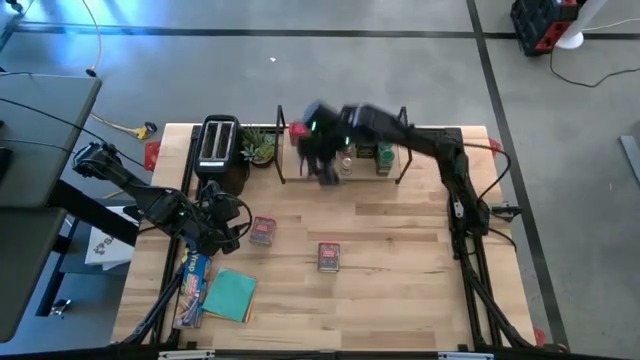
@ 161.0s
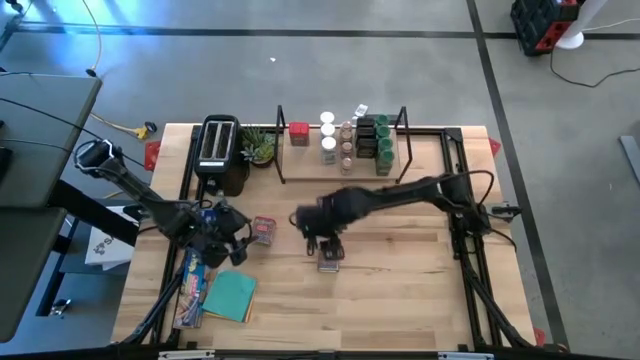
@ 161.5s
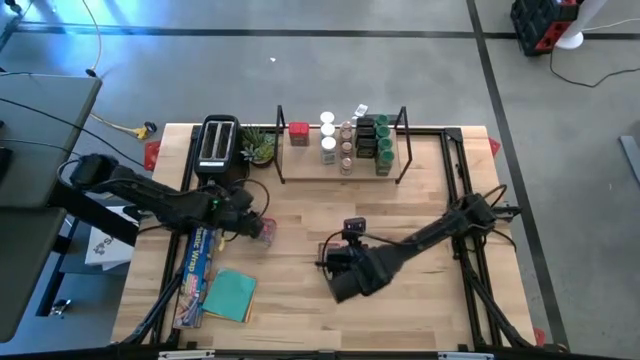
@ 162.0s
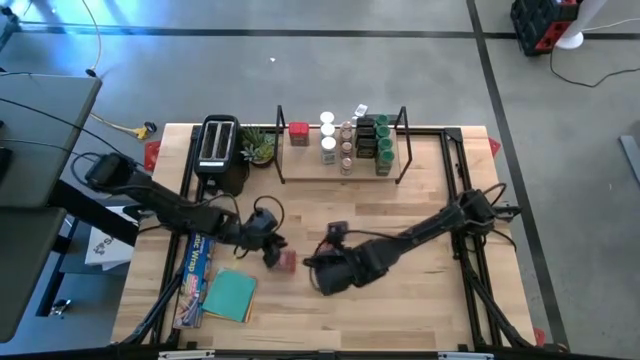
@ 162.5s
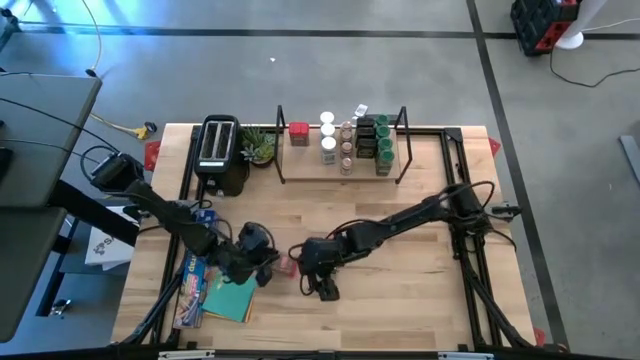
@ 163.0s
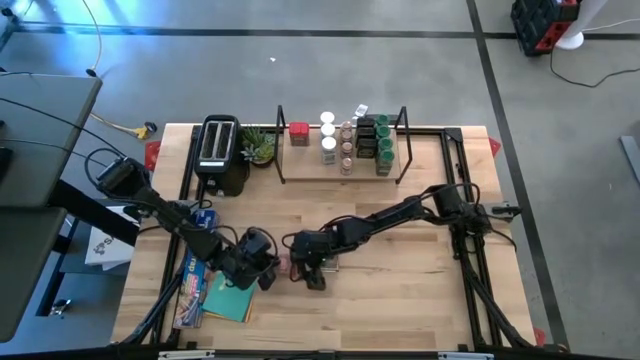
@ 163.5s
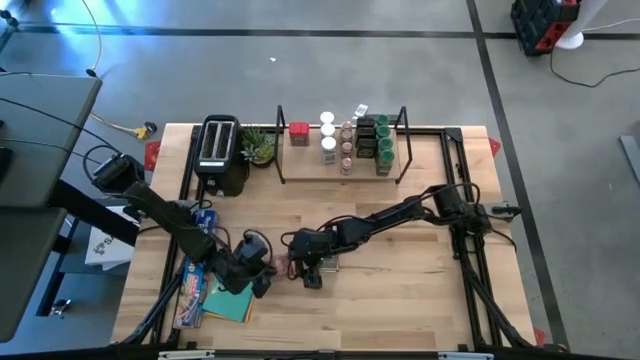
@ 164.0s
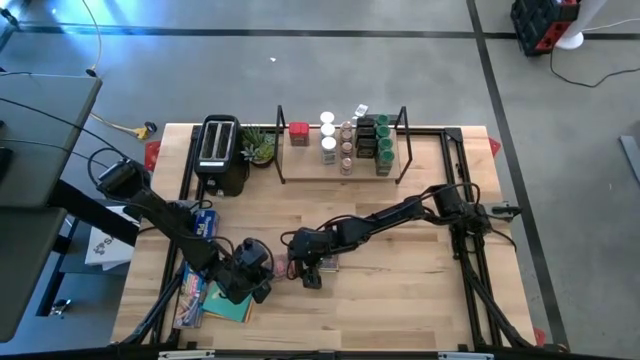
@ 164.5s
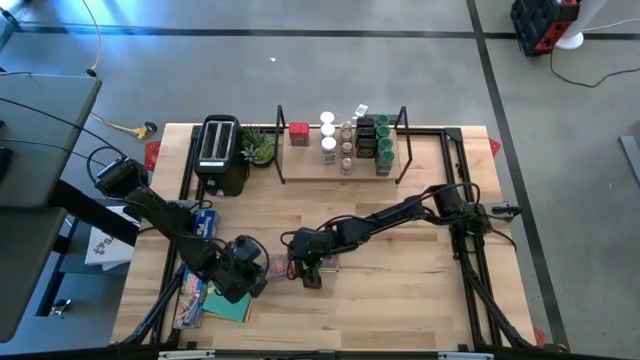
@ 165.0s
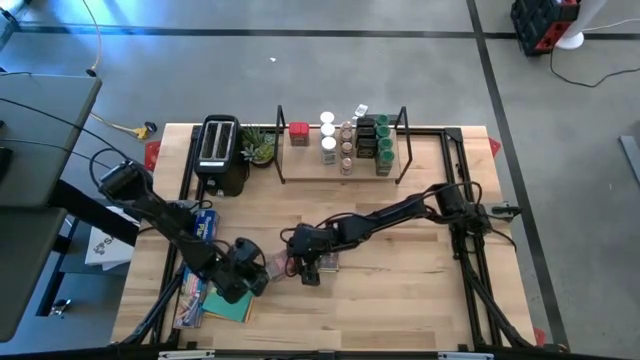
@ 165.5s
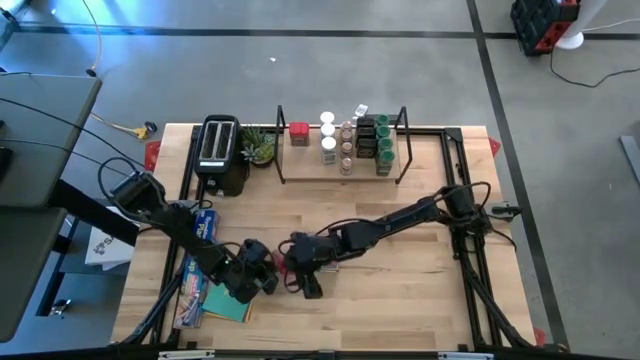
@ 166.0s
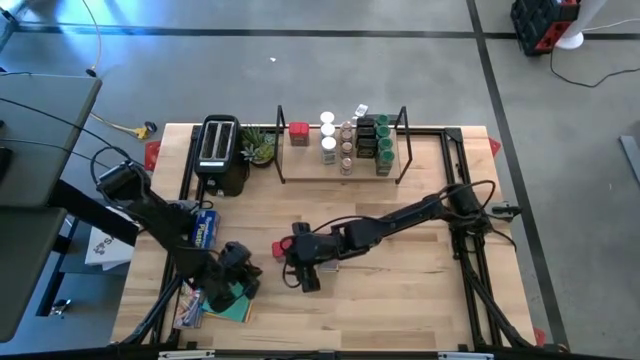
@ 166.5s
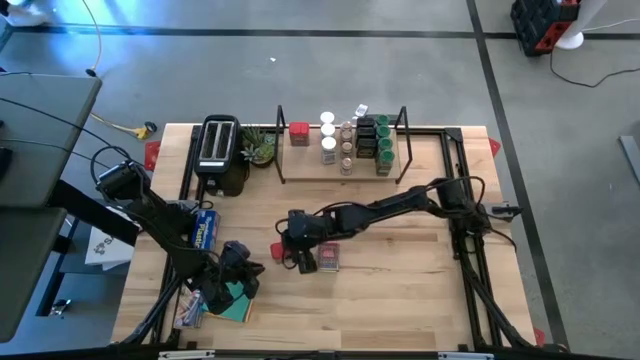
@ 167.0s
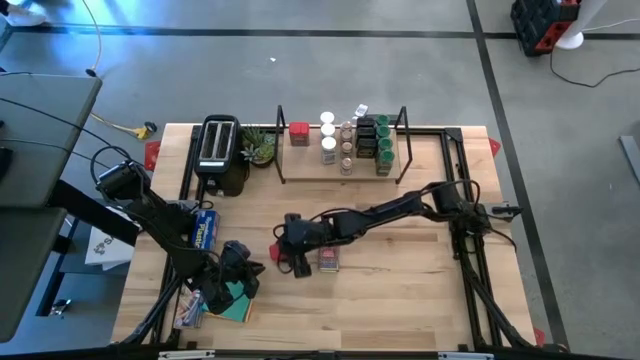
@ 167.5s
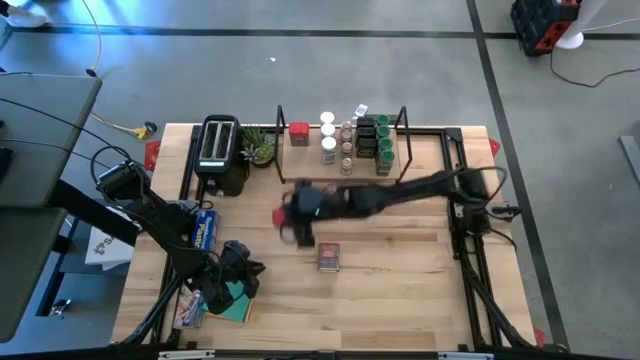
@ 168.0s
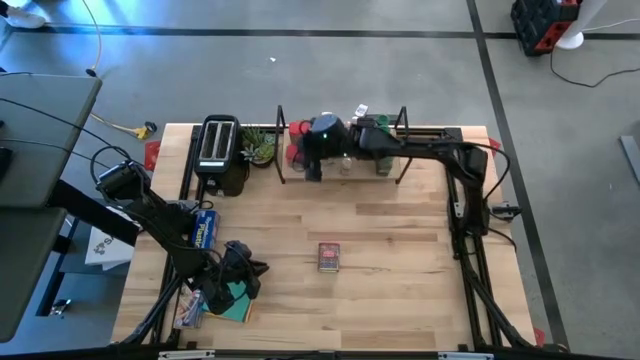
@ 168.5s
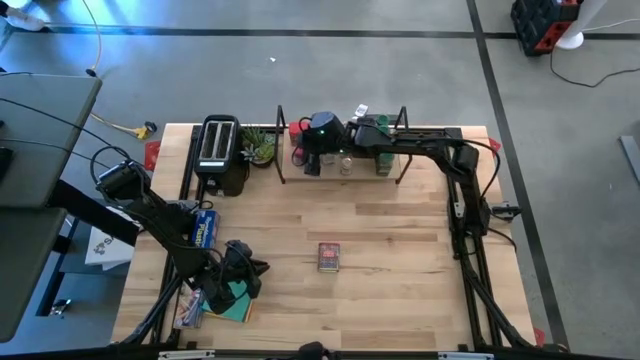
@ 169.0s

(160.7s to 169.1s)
Task: Shelf spices
Put the left red seasoning can on the shelf aligned with the other red seasoning can

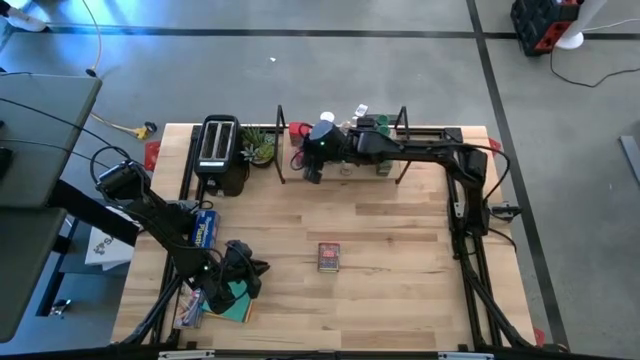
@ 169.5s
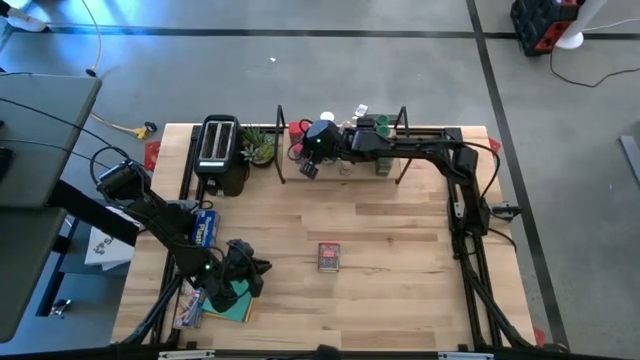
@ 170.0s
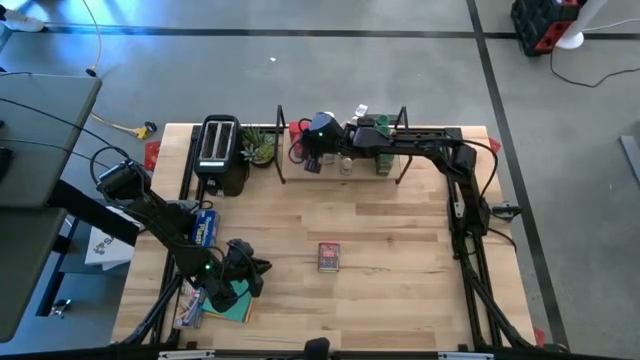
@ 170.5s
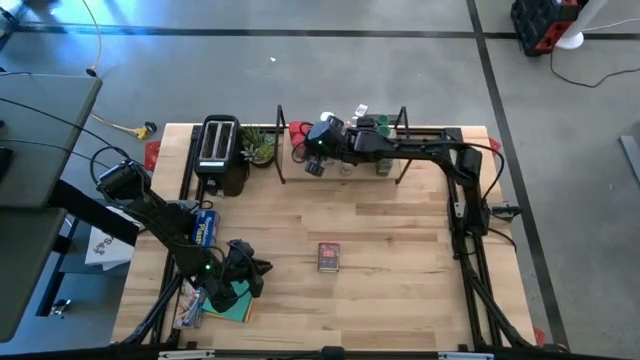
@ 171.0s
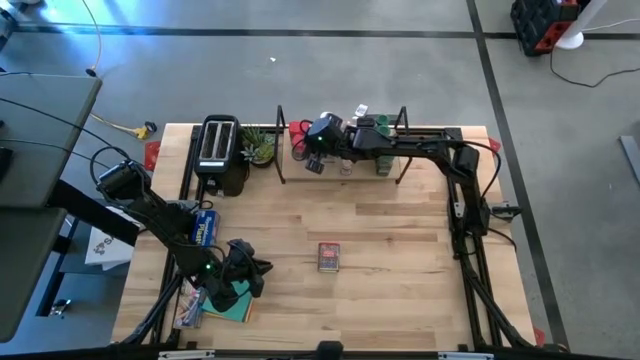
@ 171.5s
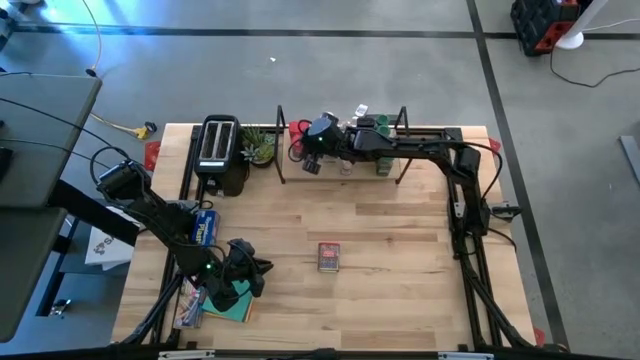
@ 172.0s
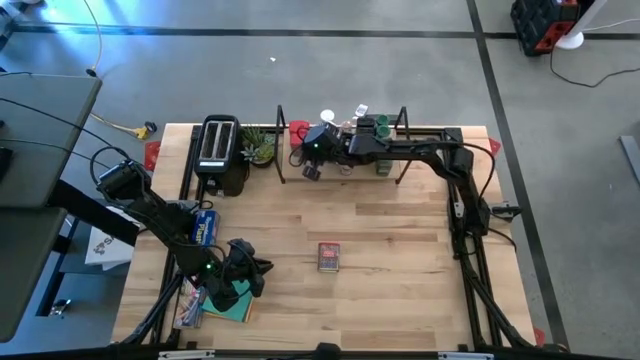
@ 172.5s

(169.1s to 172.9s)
Adjust the red seasoning can

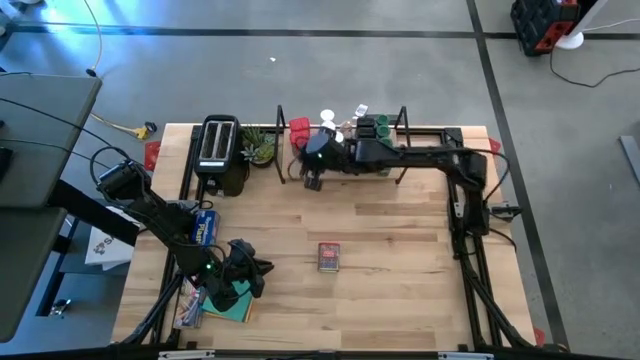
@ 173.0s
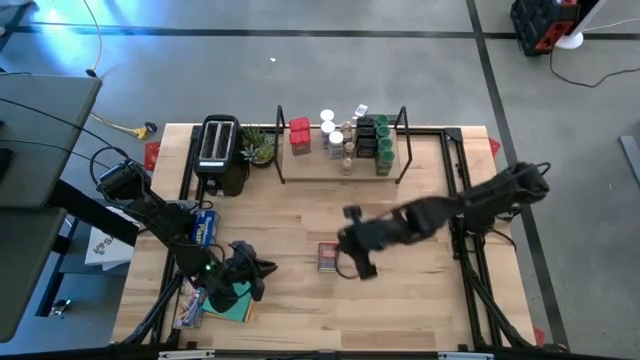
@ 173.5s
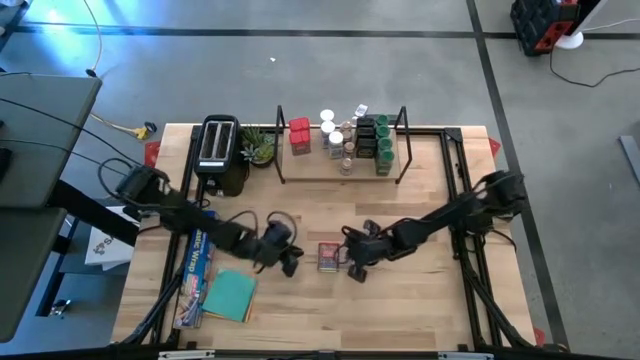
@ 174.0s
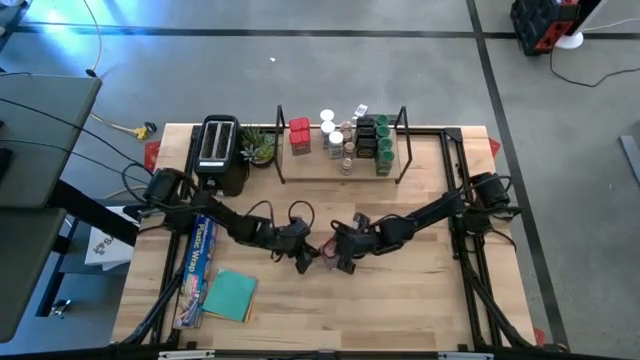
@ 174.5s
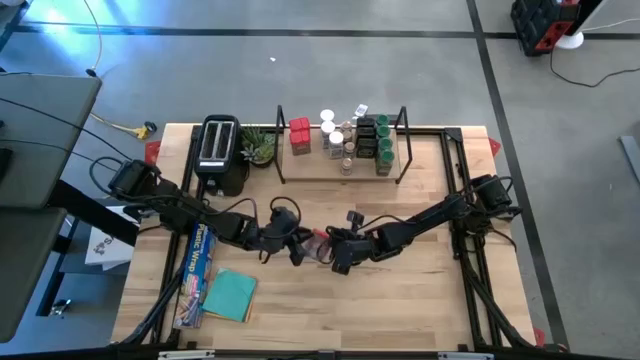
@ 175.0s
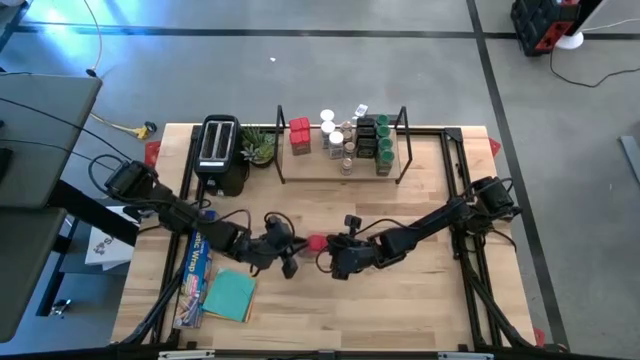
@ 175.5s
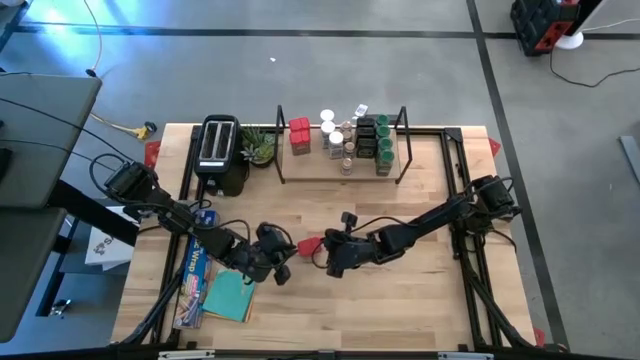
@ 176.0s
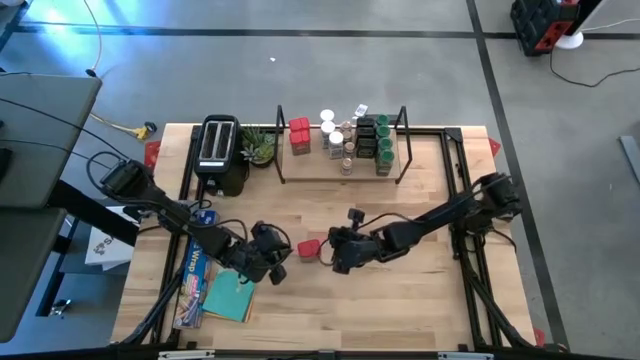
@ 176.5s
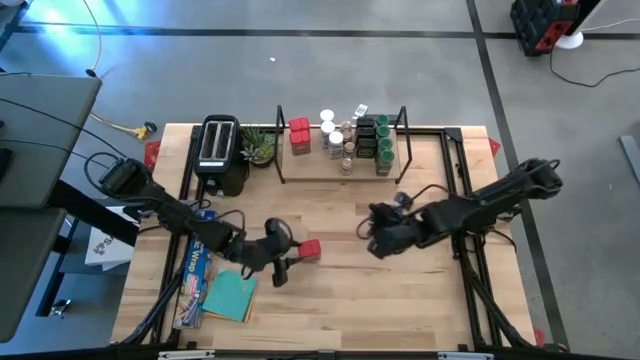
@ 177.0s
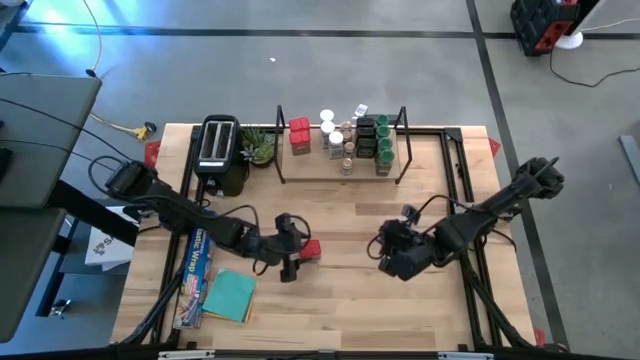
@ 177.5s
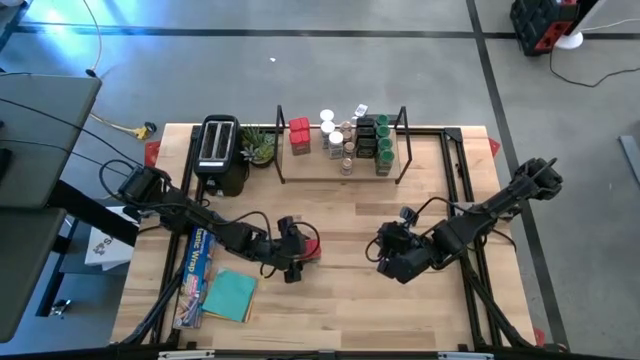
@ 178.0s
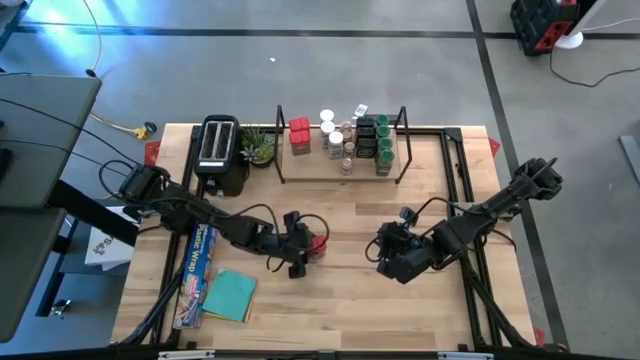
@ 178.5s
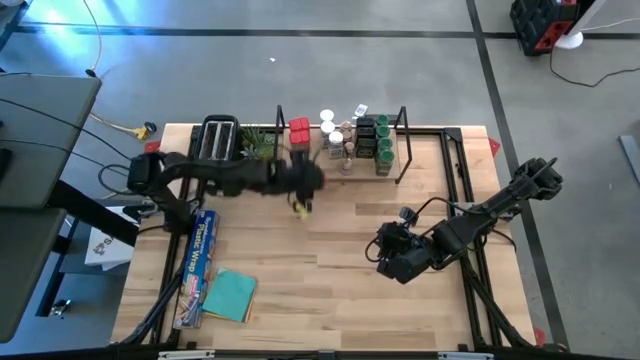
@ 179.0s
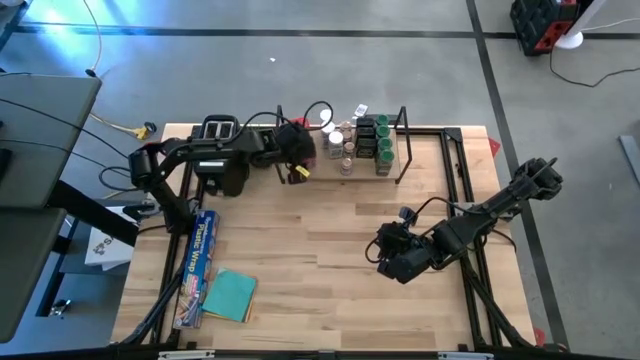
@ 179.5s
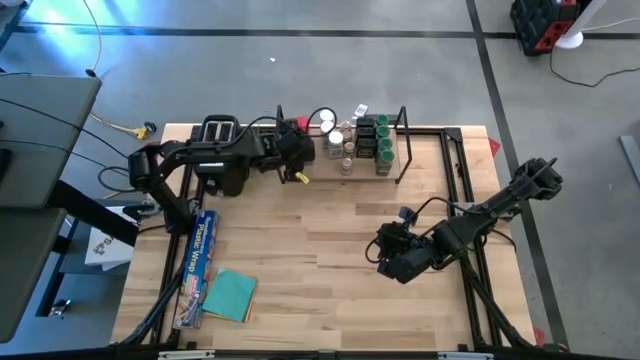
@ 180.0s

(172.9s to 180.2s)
Put the red seasoning can on the shelf aligned with the other red seasoning cans

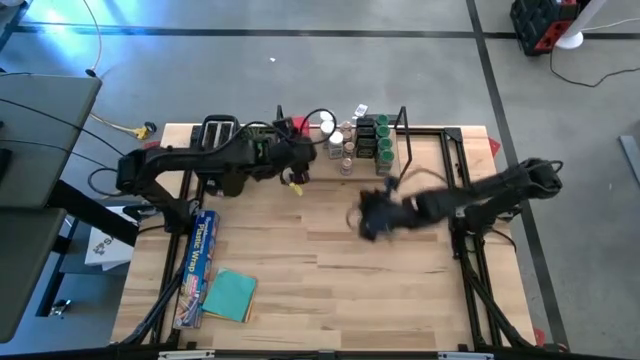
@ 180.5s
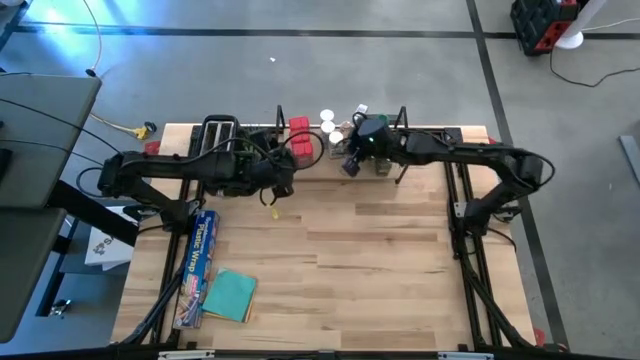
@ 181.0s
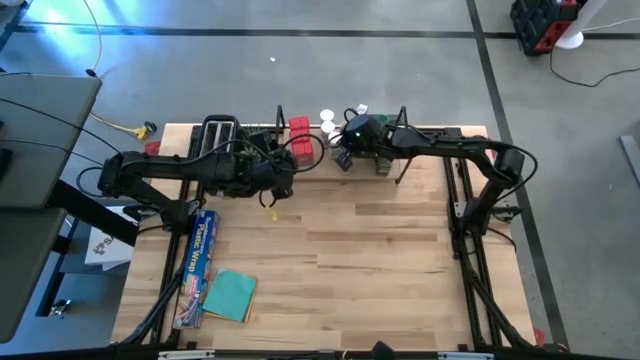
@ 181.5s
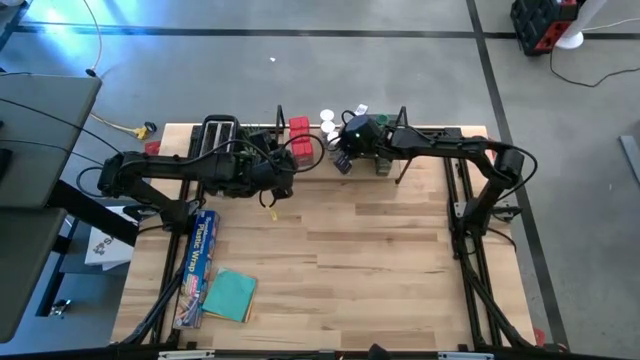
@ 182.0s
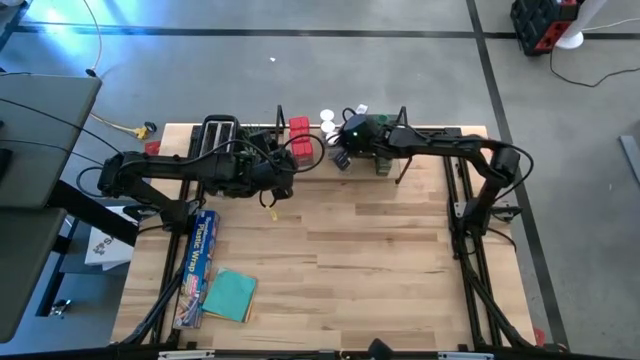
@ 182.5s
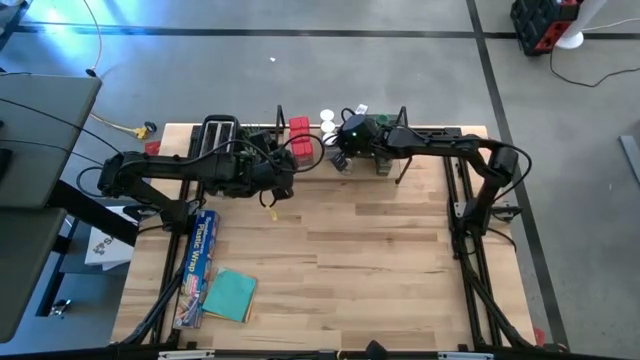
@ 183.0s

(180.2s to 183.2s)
Adjust the white seasoning bottle
